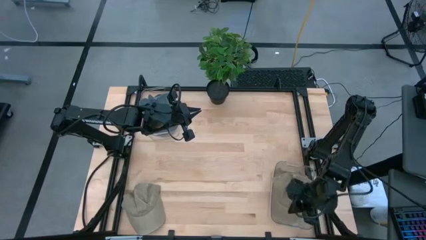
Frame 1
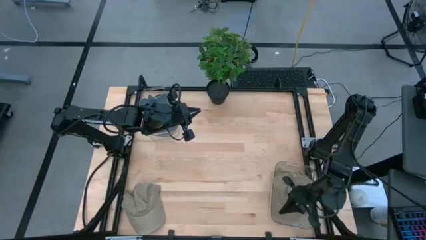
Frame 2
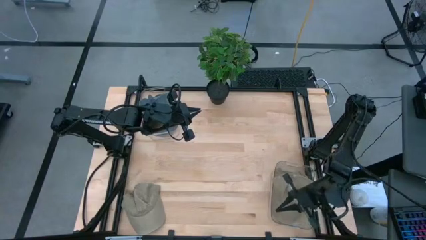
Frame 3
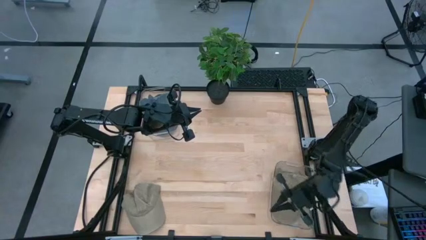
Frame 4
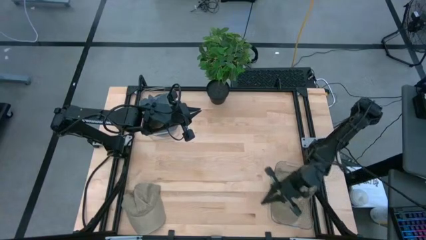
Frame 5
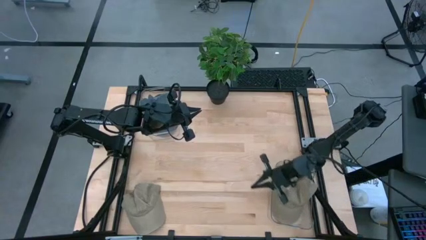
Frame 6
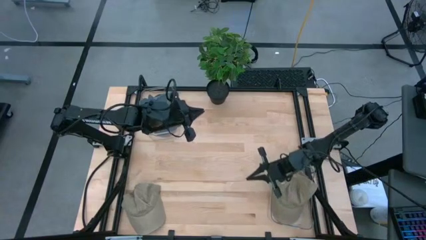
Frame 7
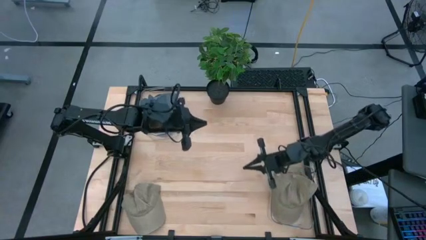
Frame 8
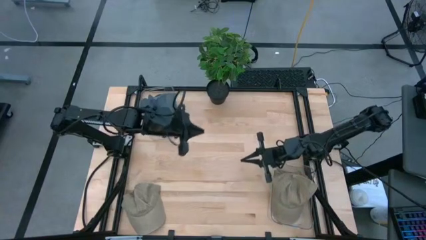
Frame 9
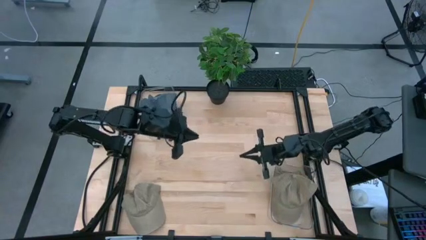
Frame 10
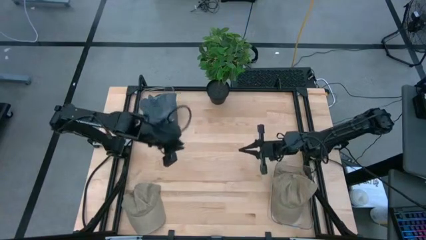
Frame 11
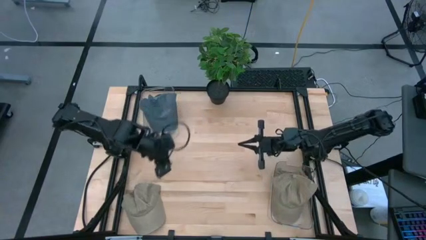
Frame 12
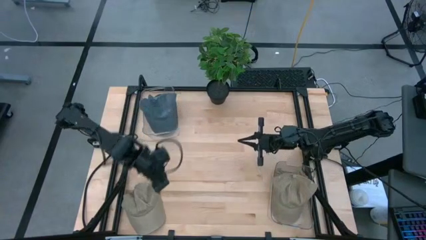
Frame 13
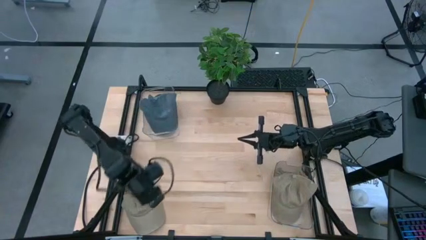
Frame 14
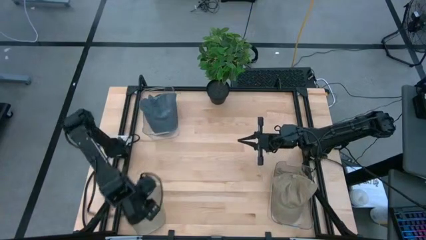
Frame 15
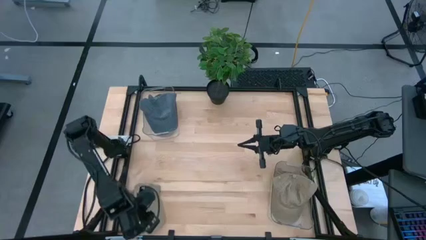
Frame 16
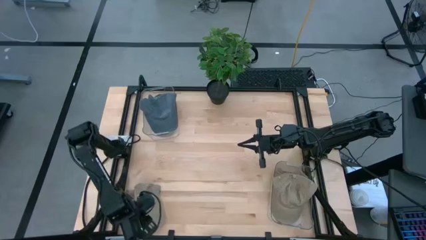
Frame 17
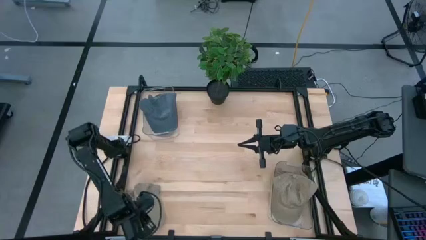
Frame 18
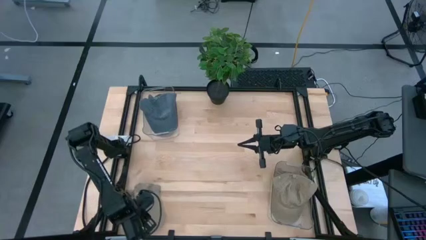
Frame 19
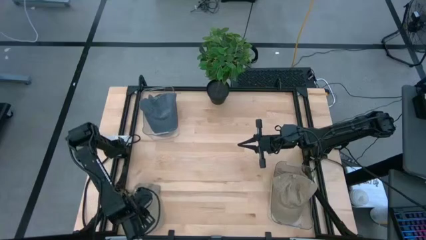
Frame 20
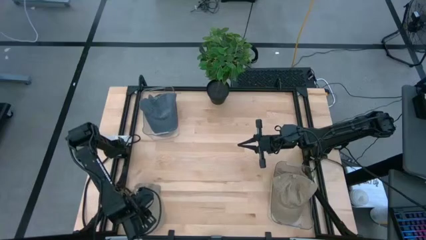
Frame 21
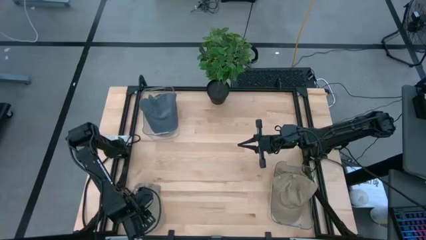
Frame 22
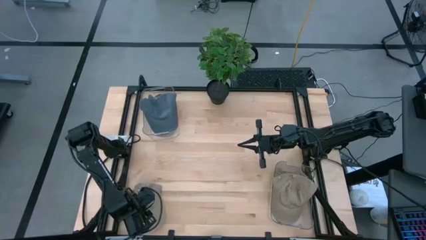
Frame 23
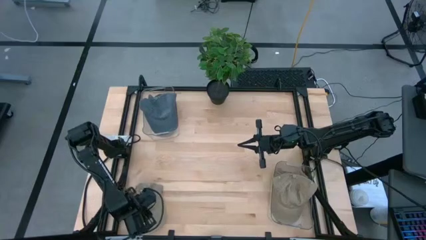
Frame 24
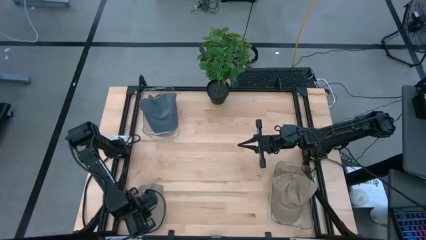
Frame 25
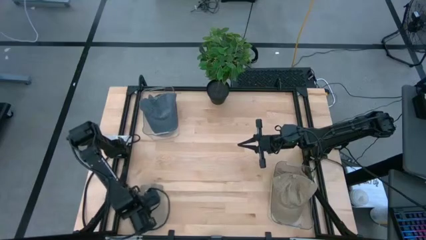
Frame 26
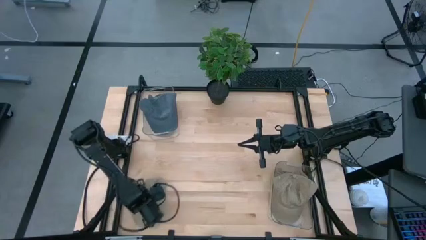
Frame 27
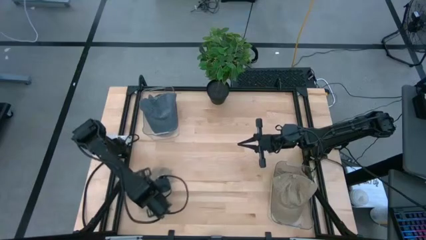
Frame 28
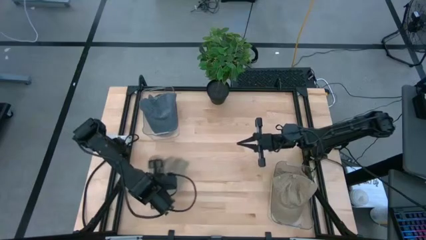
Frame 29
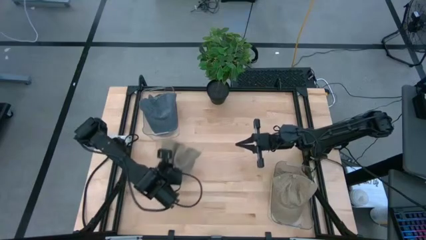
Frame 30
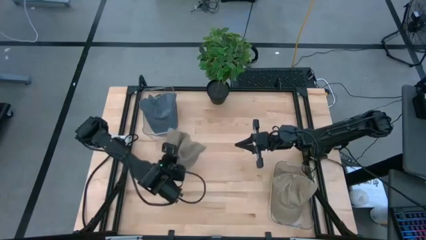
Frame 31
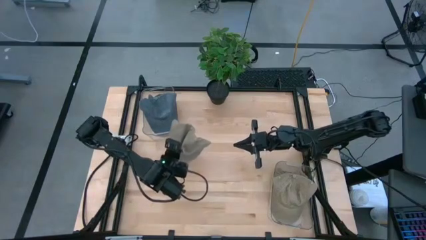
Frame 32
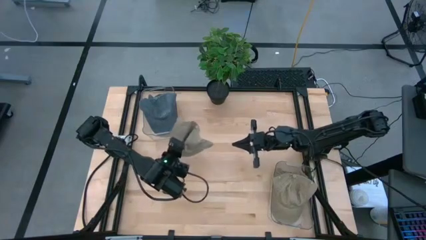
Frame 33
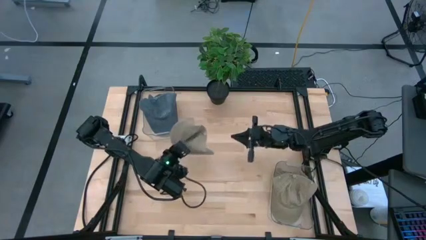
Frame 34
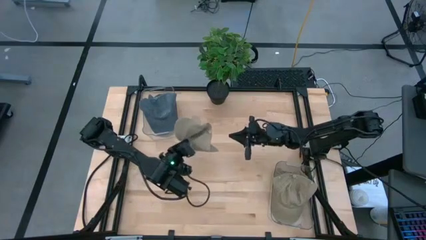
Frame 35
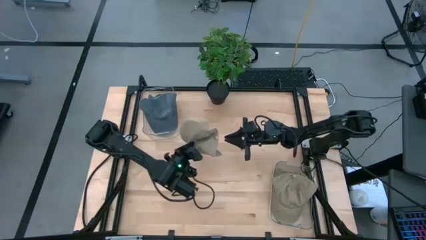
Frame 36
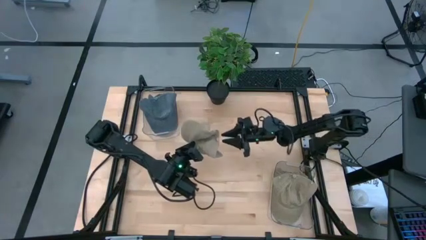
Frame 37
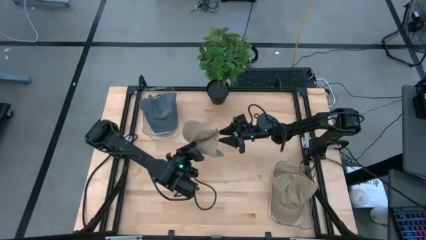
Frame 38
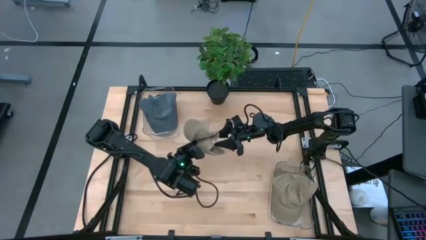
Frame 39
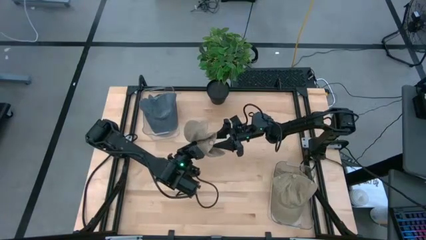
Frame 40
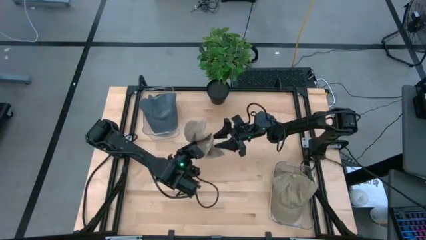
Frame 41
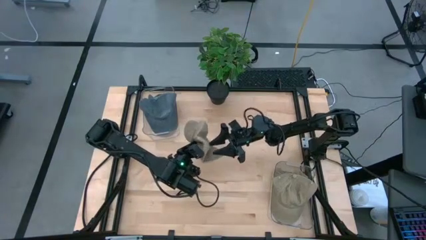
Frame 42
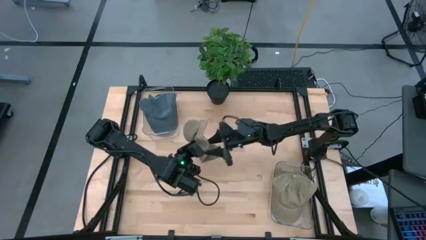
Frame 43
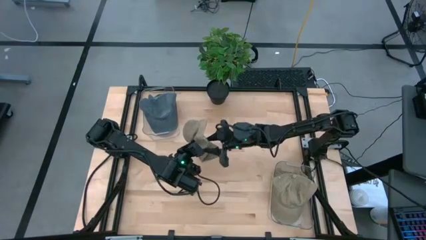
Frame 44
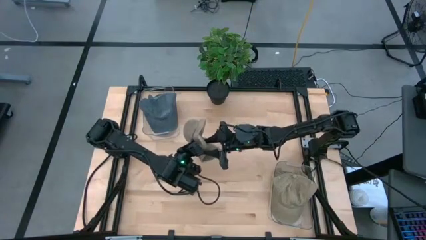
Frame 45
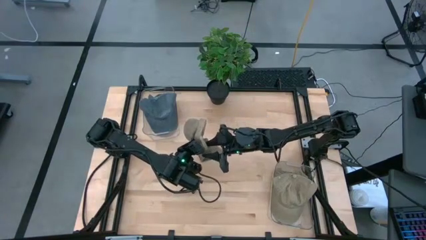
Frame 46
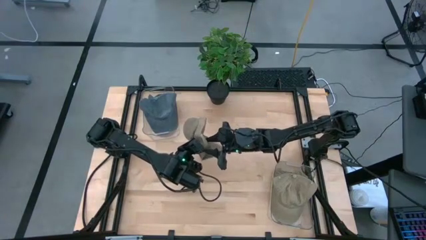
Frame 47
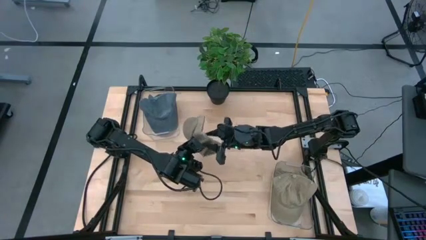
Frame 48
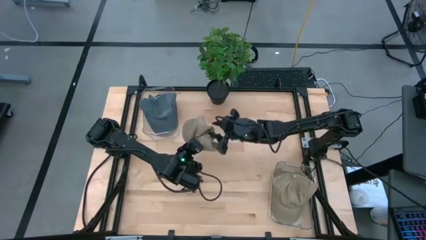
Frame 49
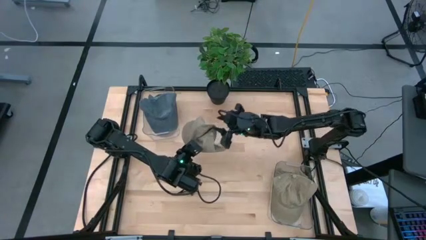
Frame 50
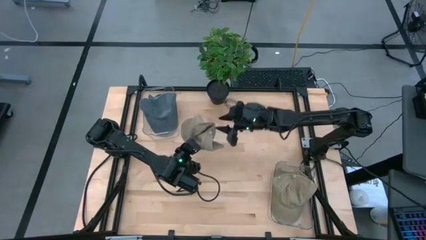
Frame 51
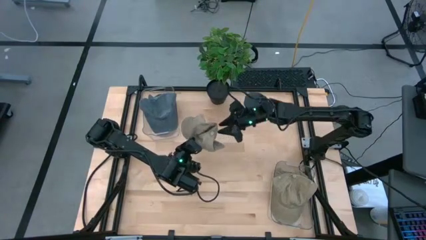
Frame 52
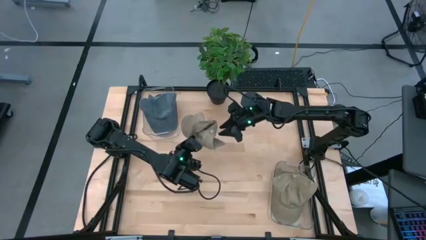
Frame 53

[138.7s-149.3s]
Task: Pick & Place hat
Put the brown cap into the right transparent bin

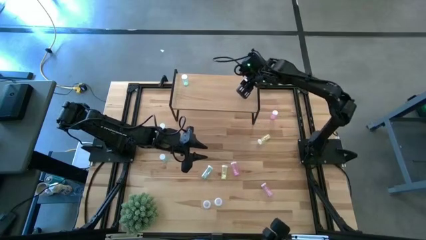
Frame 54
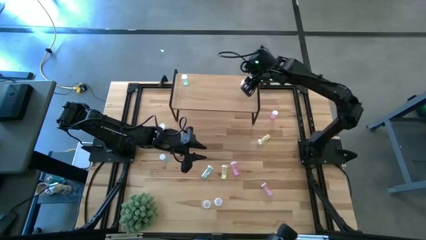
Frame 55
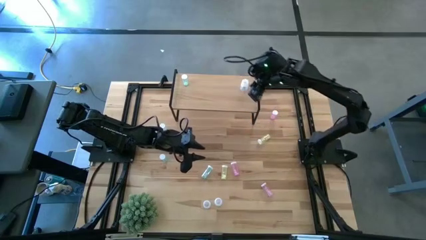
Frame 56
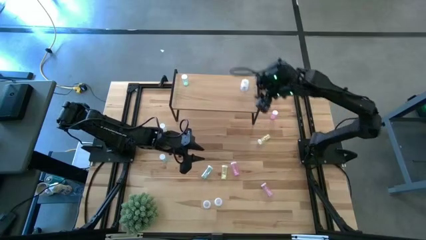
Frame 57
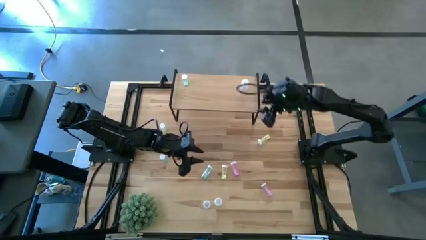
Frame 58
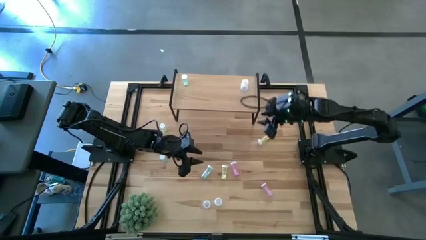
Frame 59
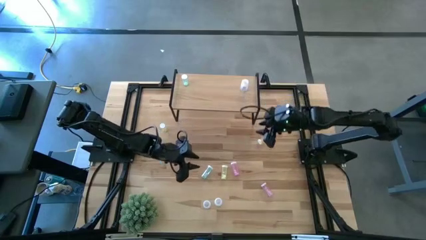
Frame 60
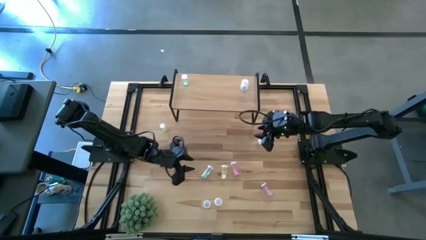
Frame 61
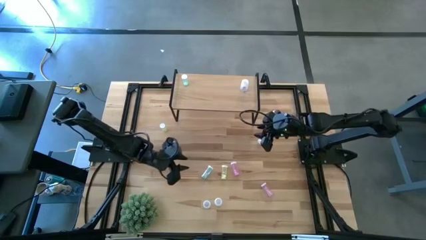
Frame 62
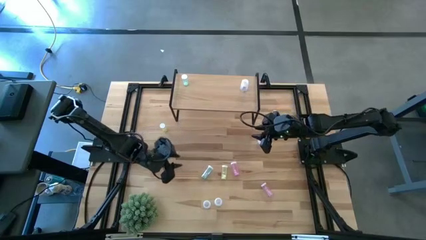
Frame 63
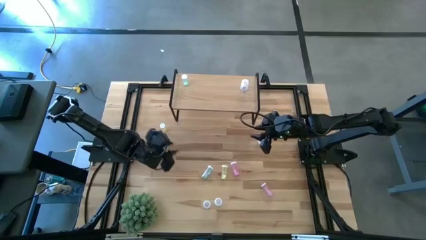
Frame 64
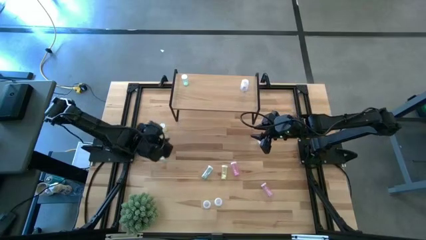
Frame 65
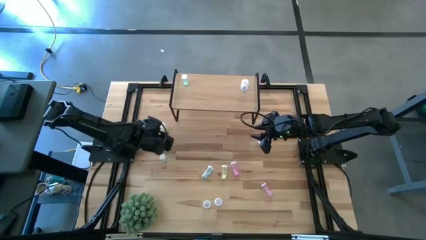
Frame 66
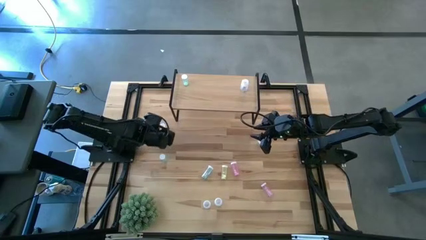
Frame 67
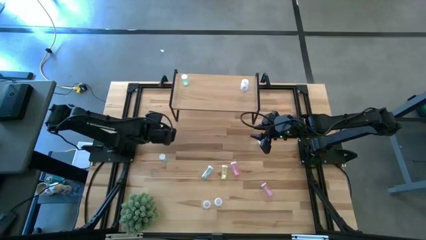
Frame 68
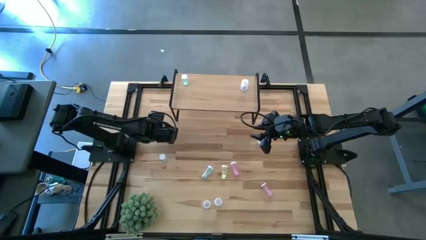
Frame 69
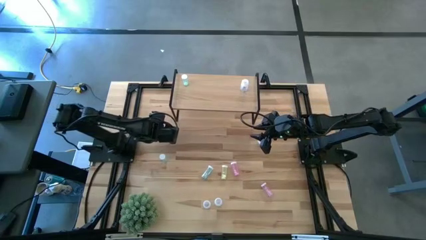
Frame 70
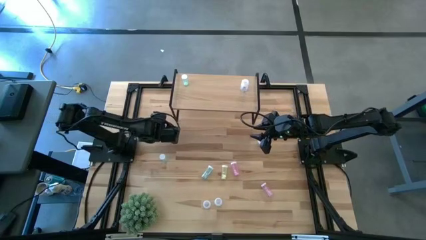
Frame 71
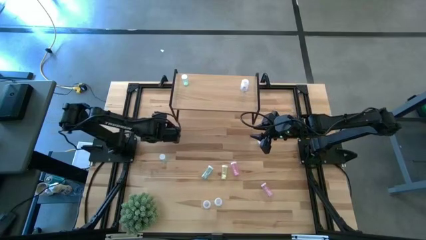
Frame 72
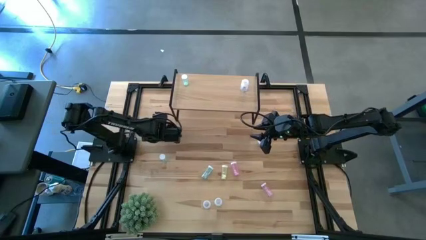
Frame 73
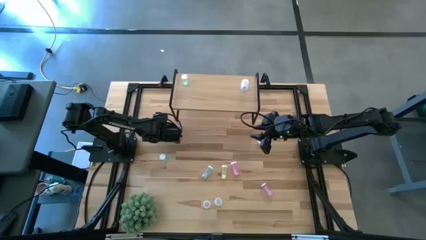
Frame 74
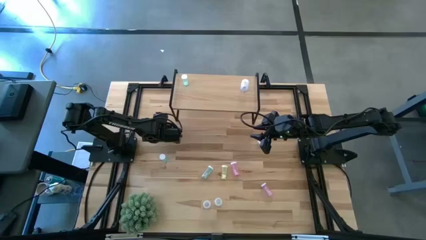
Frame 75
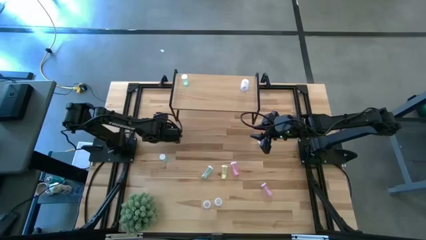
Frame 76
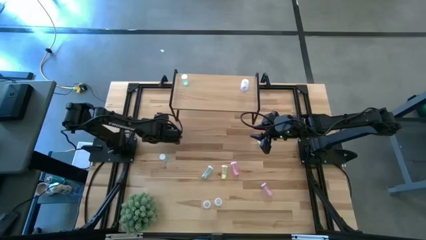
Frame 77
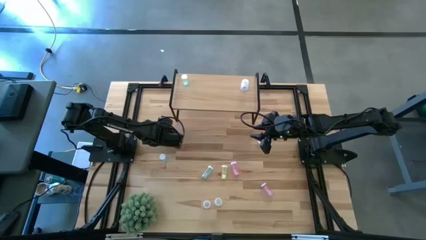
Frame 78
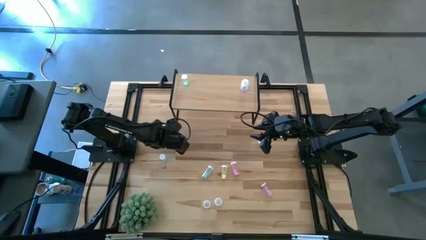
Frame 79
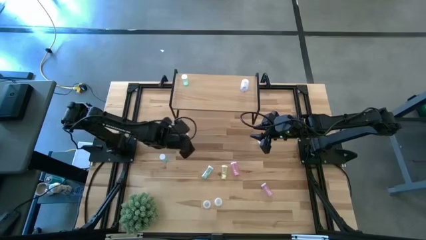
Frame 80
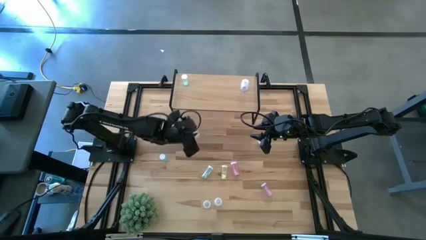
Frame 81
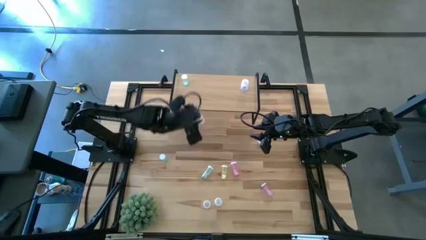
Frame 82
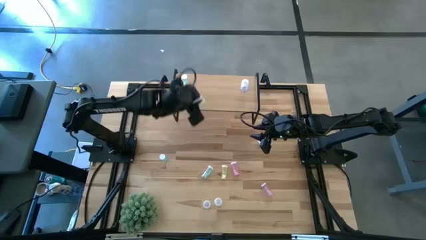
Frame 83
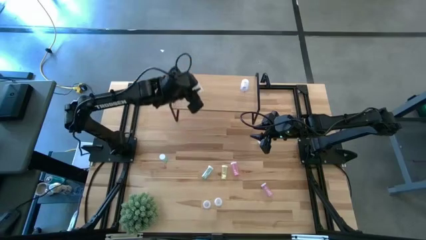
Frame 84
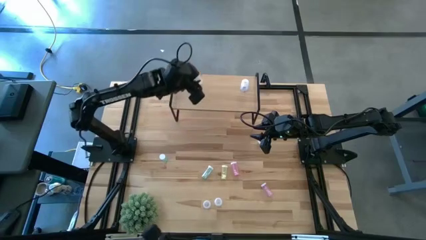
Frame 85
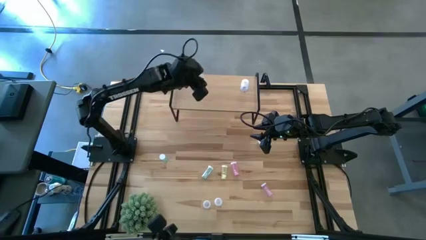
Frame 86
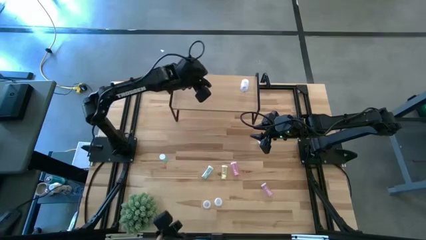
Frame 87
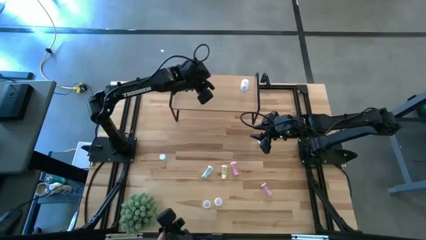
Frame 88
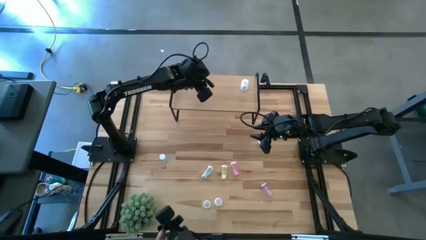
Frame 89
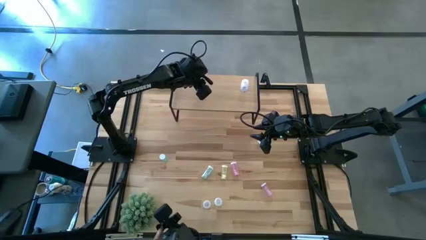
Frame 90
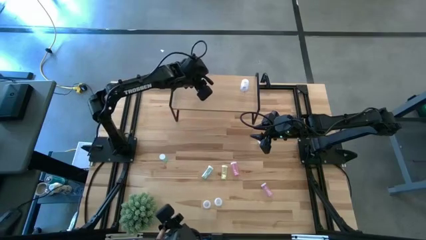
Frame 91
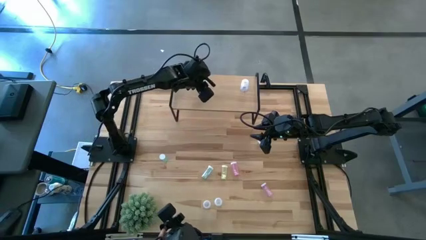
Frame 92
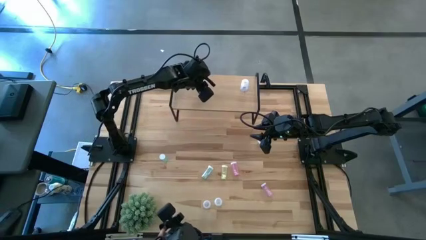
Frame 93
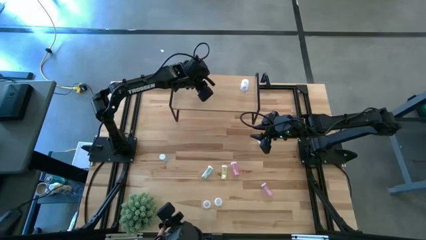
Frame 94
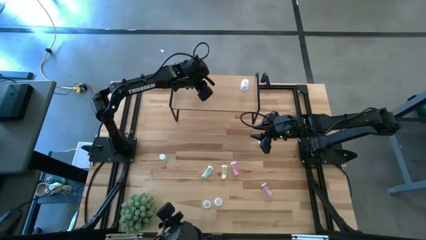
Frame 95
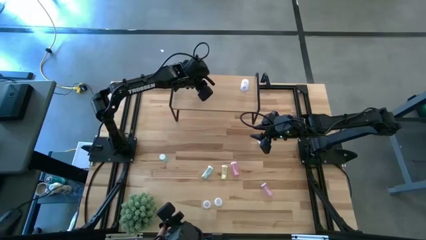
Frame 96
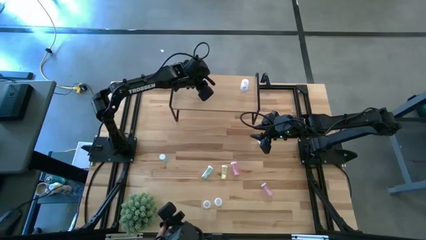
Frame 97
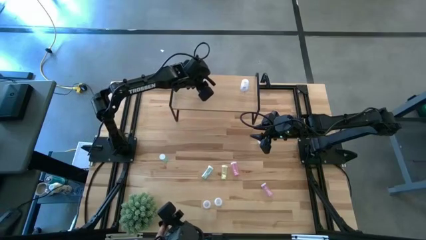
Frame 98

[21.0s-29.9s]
Task: Pick and place medicine bottles onto shelf by color
Put the top left yellow pill bottle on the shelf
